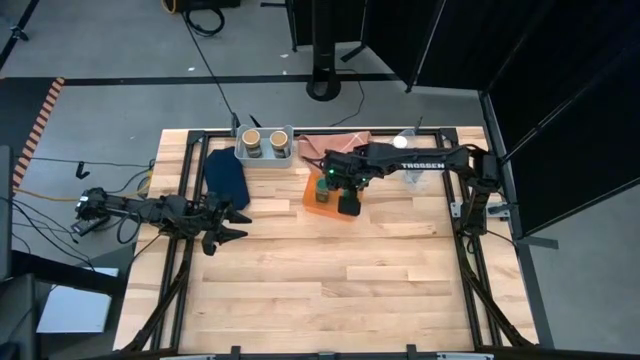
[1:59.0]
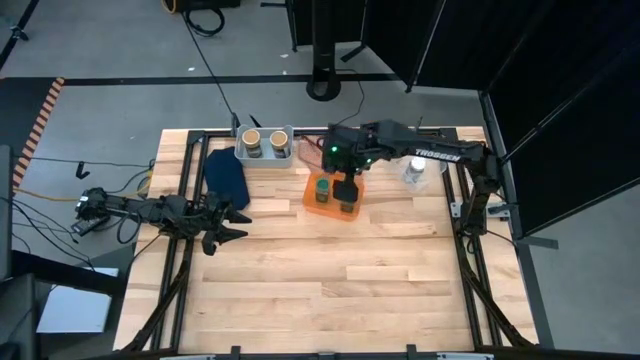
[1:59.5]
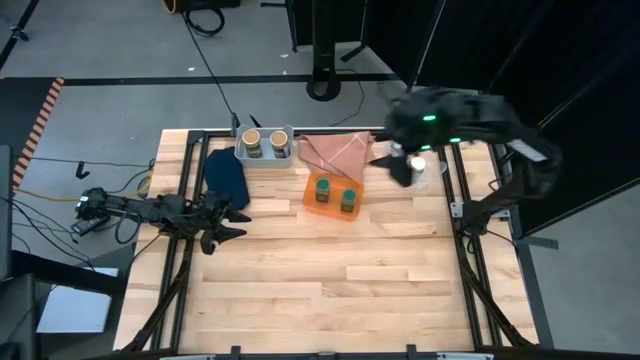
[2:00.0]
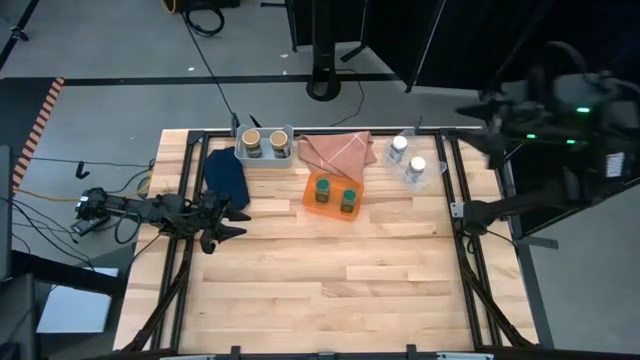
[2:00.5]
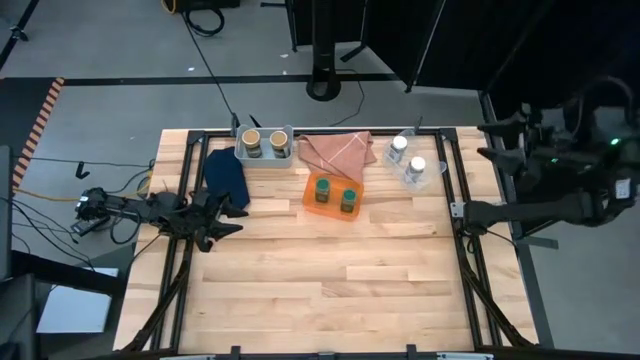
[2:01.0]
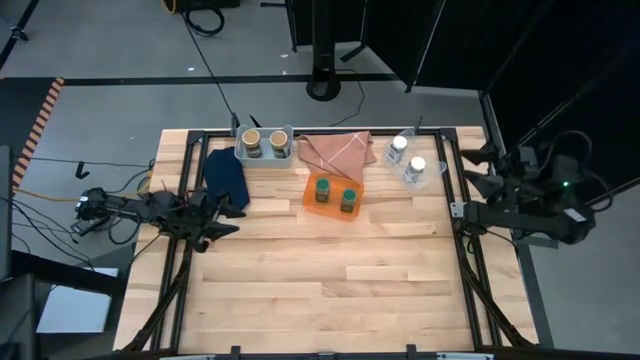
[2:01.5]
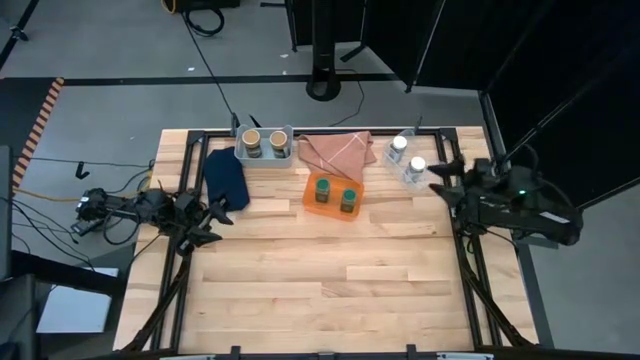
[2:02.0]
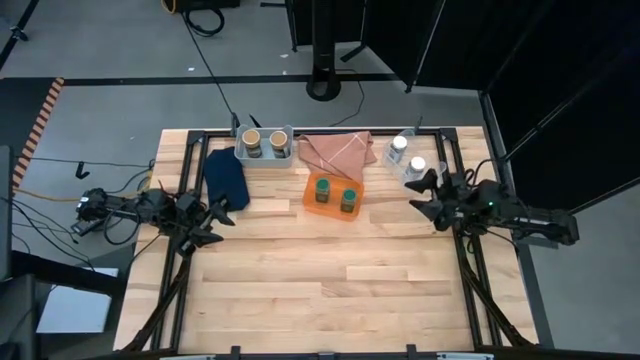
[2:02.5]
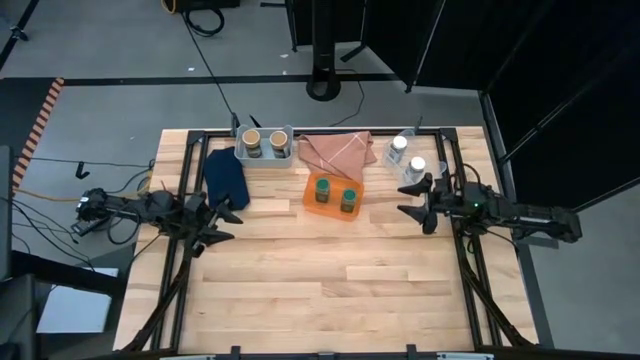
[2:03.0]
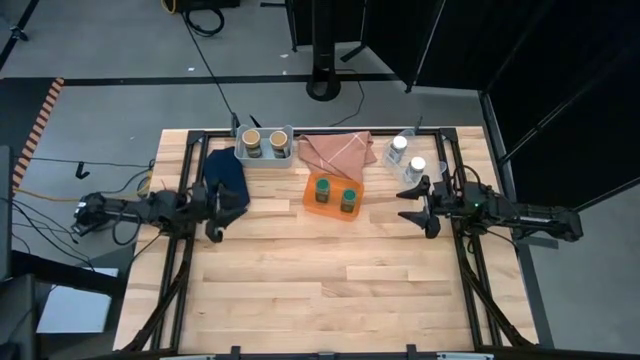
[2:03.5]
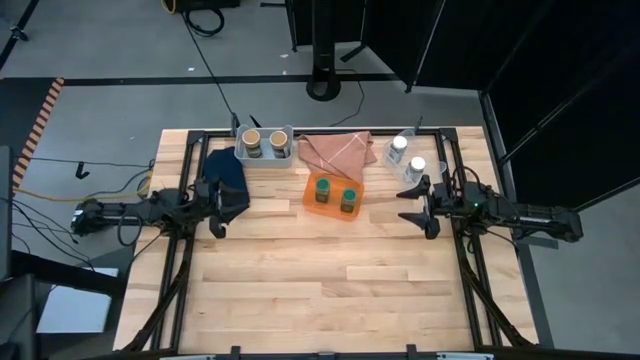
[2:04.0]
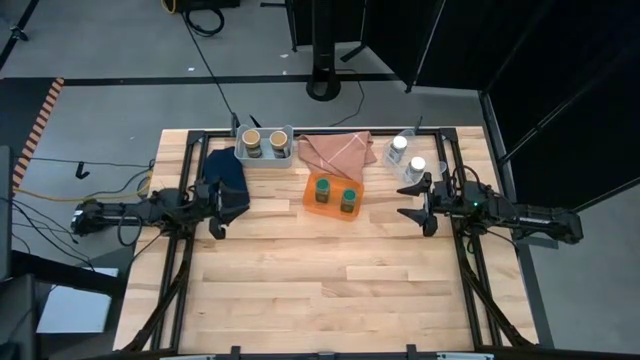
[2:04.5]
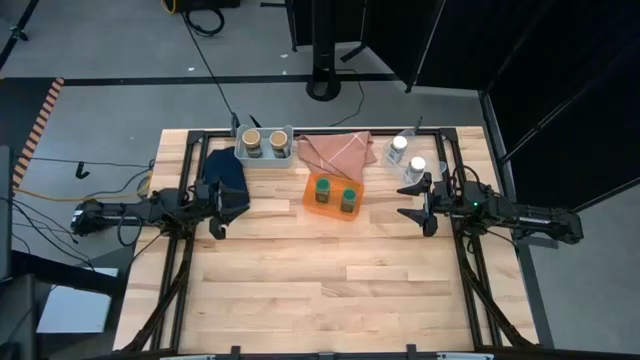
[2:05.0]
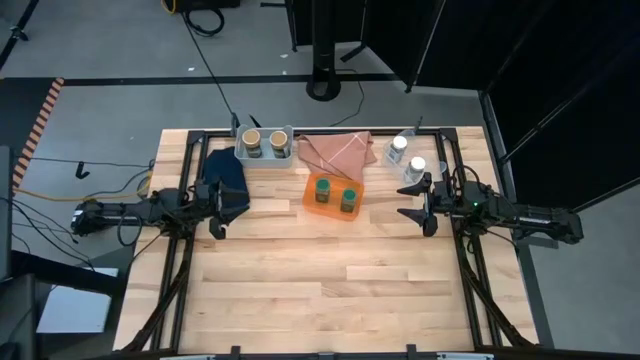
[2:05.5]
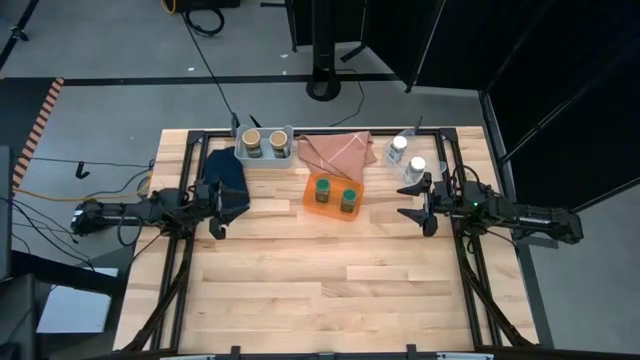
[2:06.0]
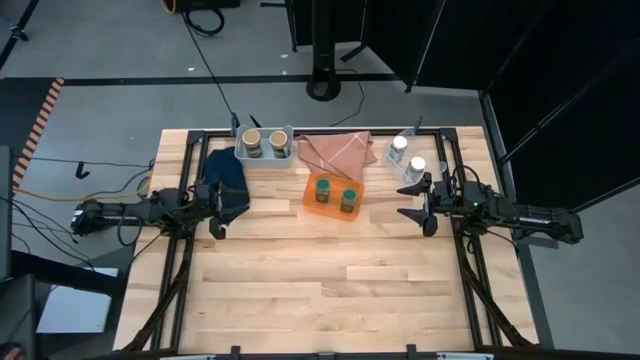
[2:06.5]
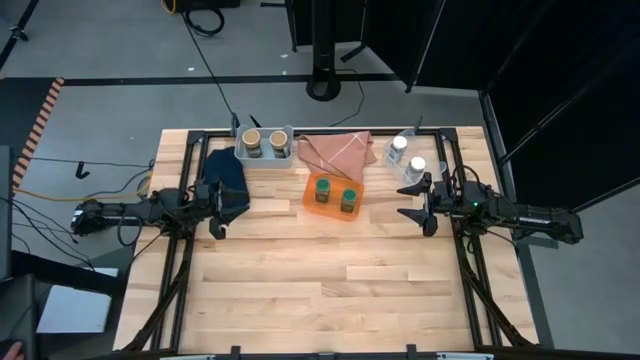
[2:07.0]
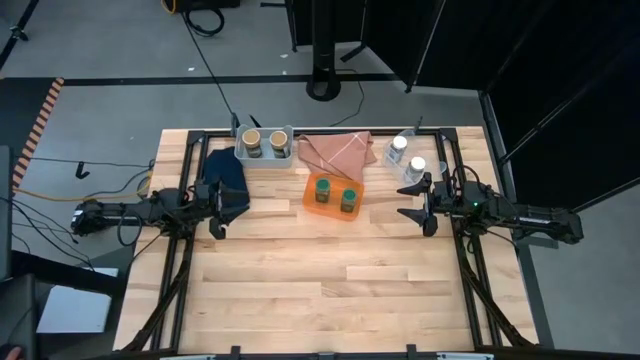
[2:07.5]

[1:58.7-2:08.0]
Task: Sort spices by type
Return to Home Position

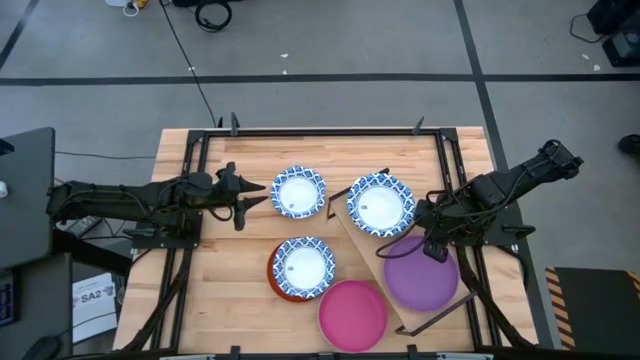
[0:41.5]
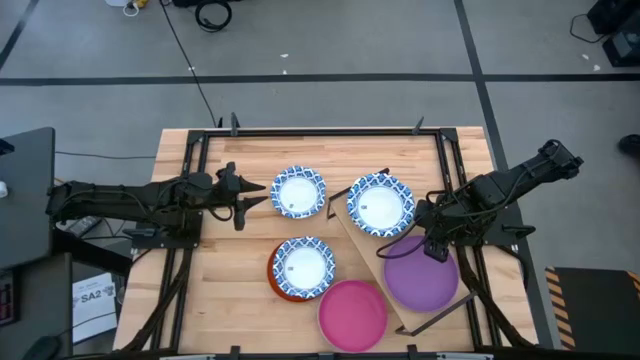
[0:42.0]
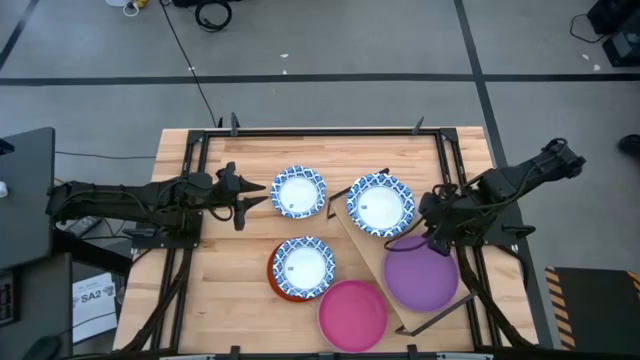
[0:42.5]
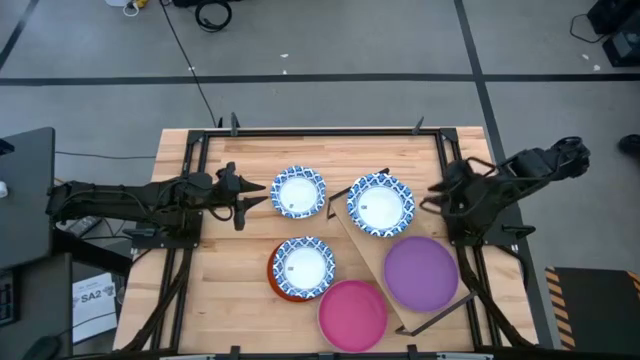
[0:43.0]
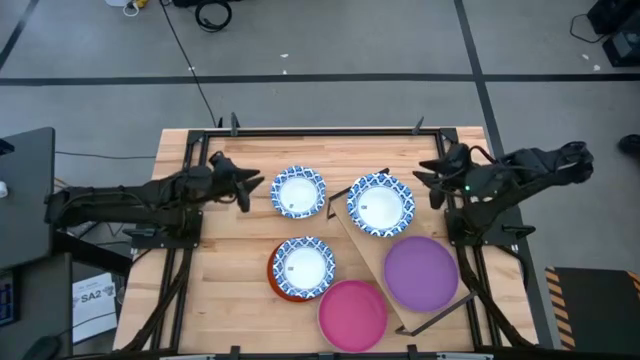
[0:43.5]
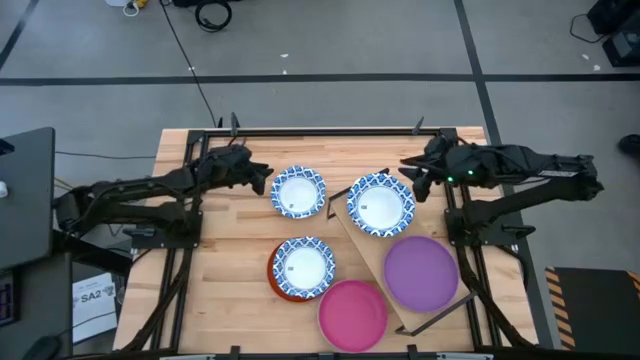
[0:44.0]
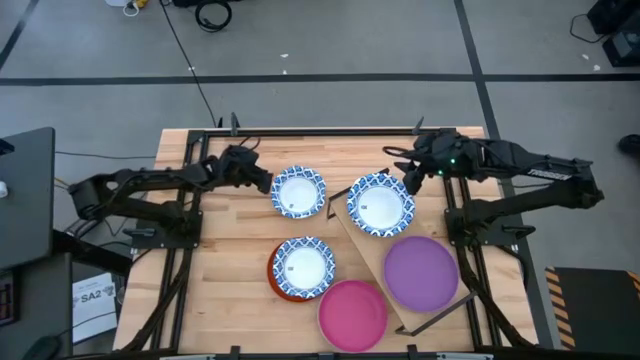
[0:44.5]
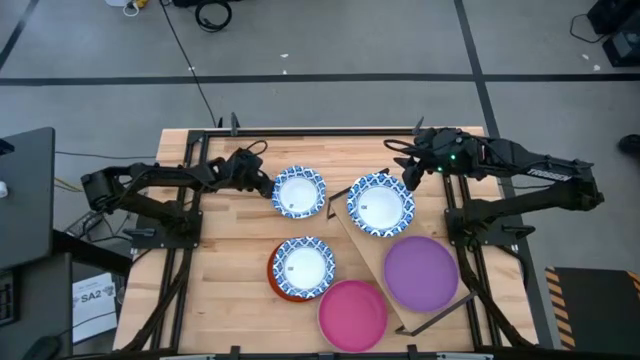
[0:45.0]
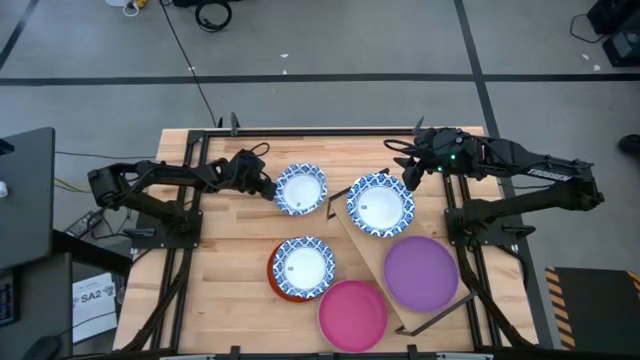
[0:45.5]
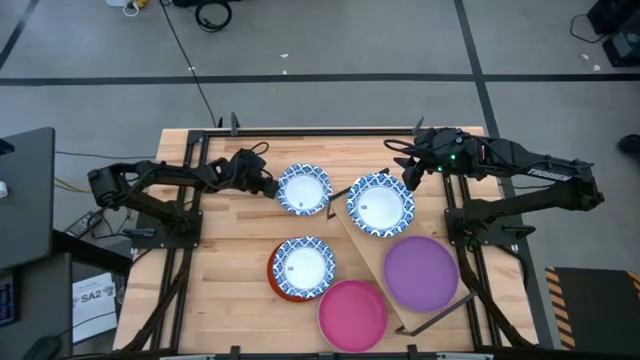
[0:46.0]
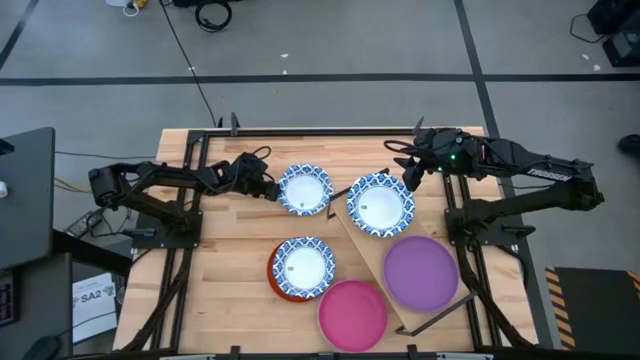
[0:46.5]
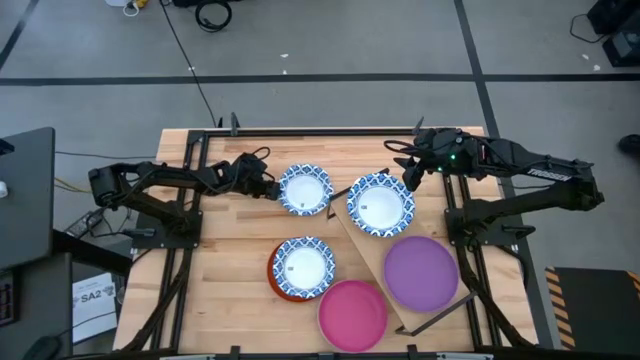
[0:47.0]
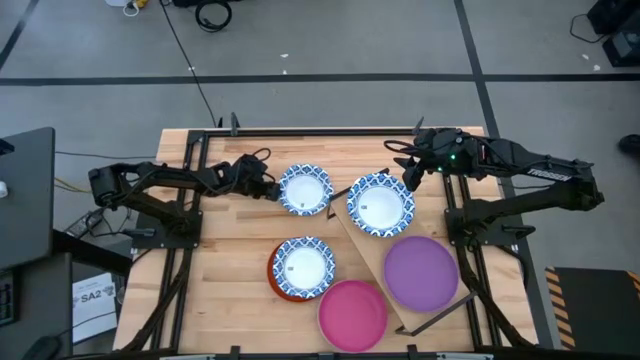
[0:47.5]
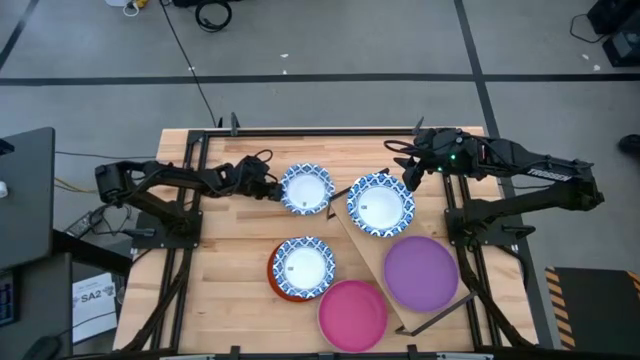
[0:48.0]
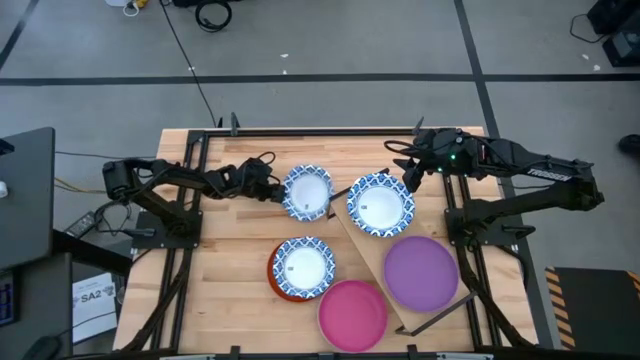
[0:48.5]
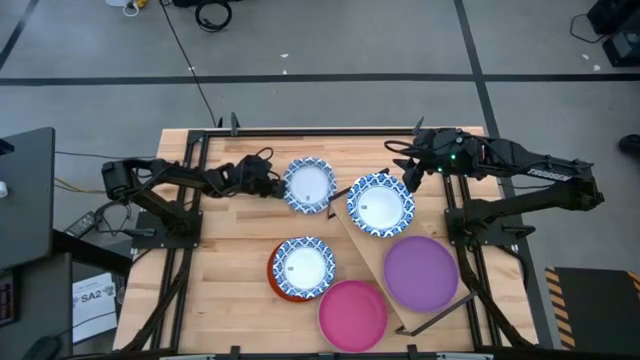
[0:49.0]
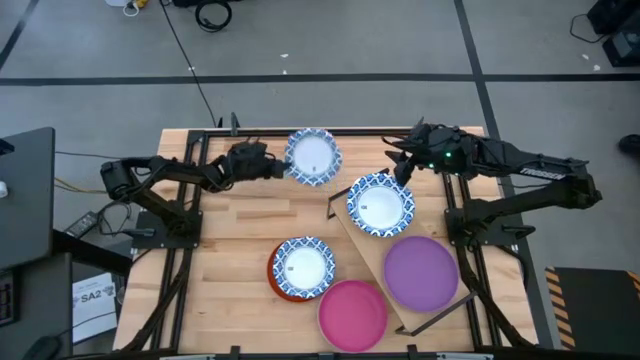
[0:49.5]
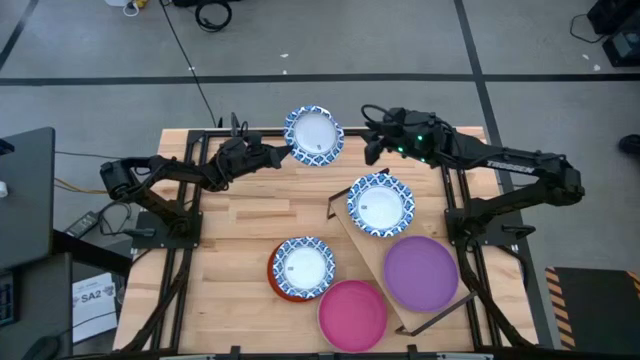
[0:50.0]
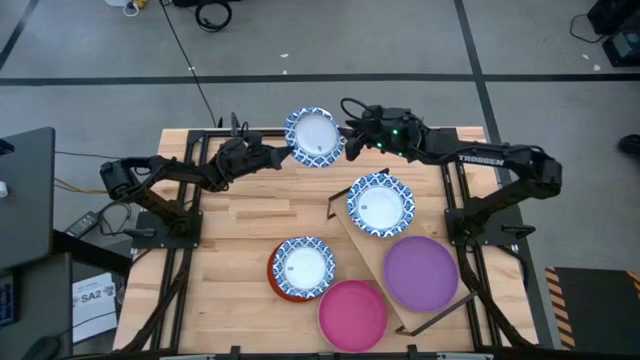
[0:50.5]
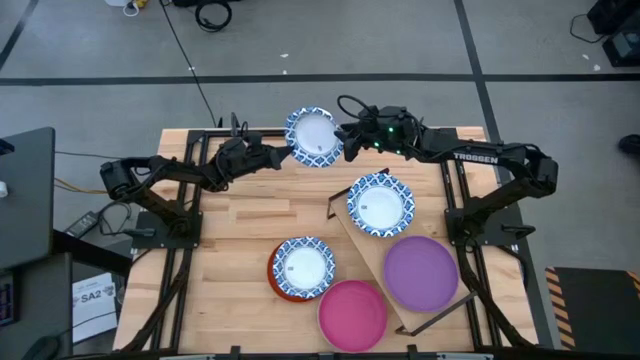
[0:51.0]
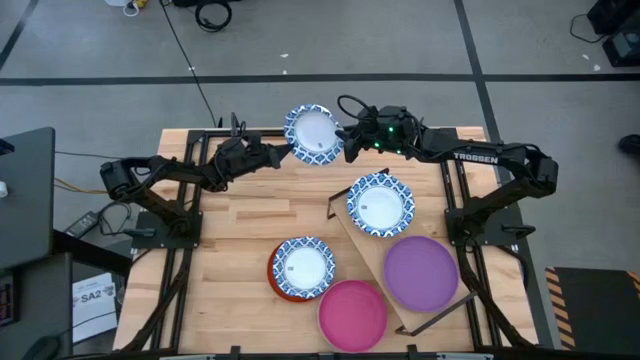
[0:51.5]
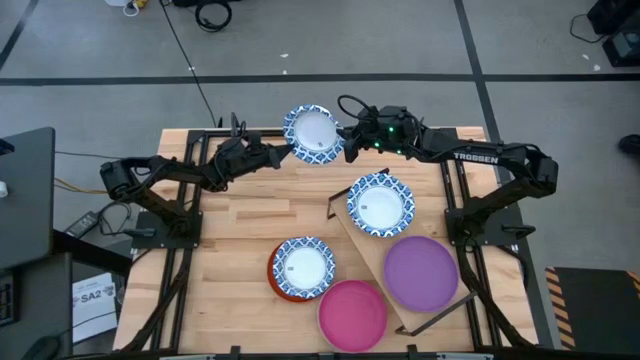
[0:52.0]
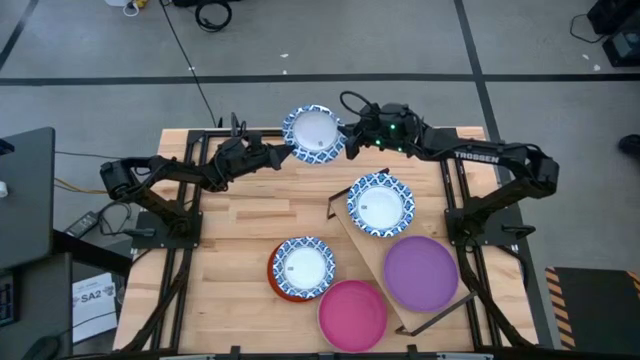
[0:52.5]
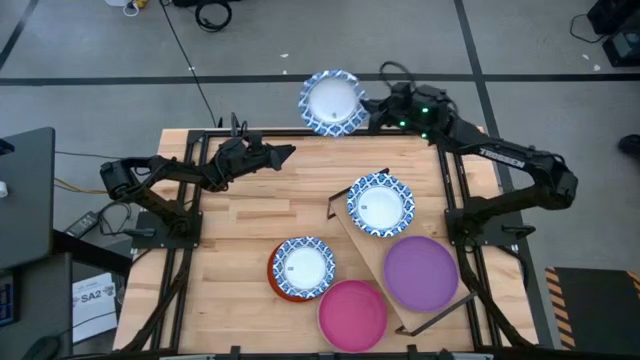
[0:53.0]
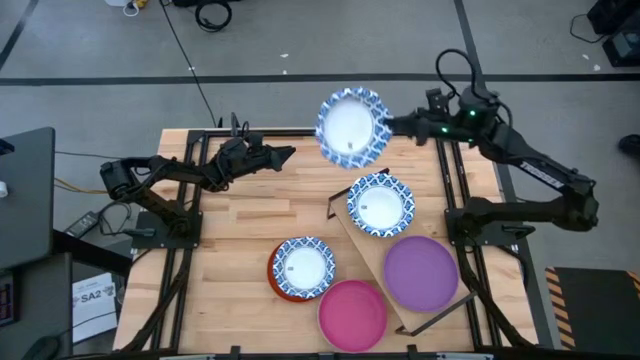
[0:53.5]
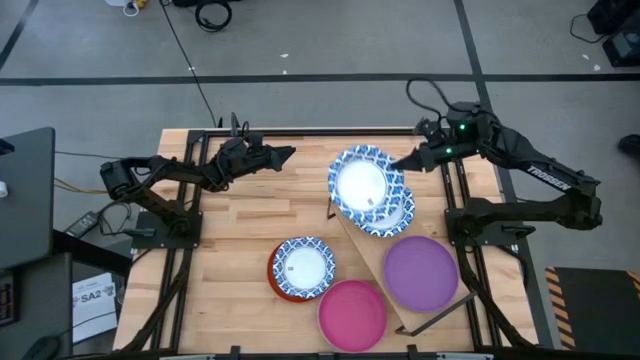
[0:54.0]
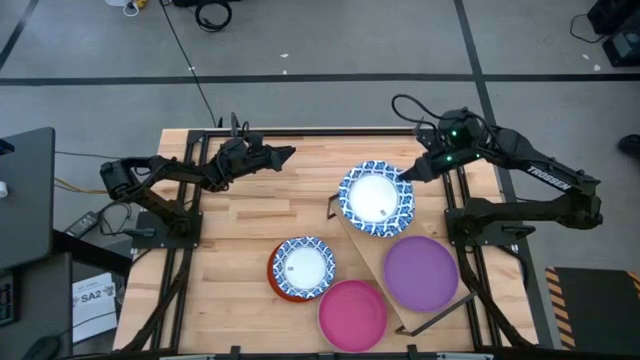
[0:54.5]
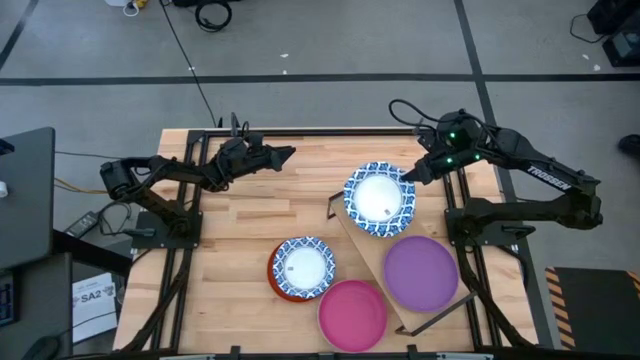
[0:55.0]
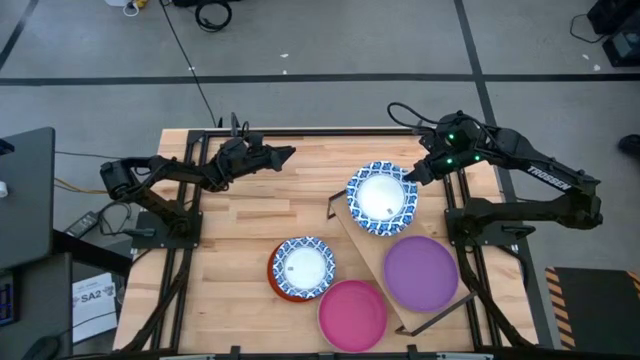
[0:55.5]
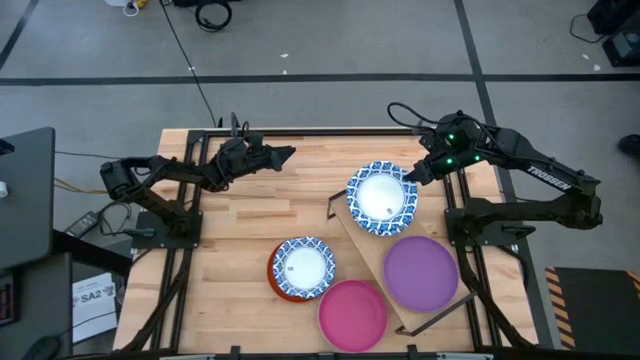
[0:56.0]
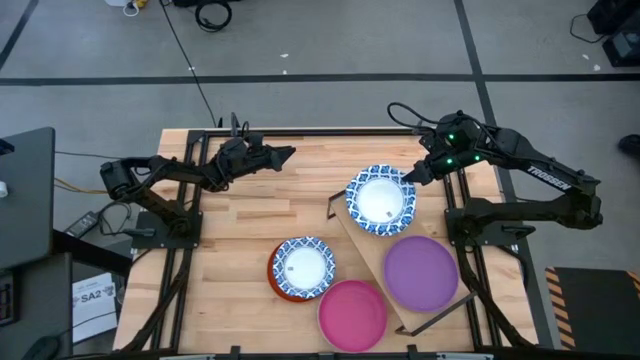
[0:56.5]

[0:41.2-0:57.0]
Task: Place and stack plates onto a shelf
Stack the white bowl on top of the white bowls on the shelf
